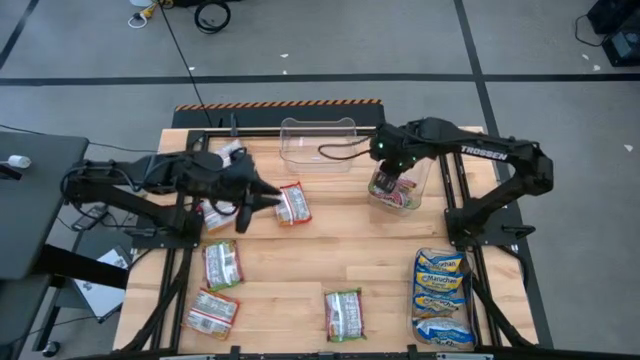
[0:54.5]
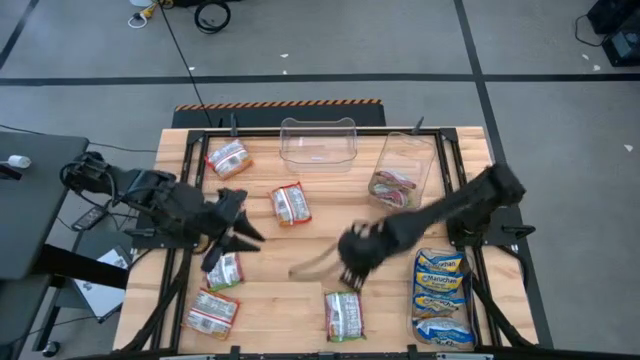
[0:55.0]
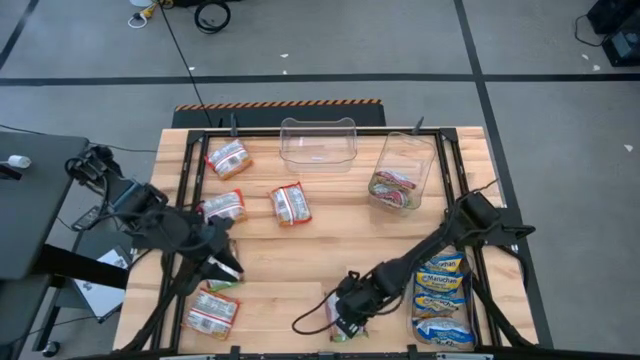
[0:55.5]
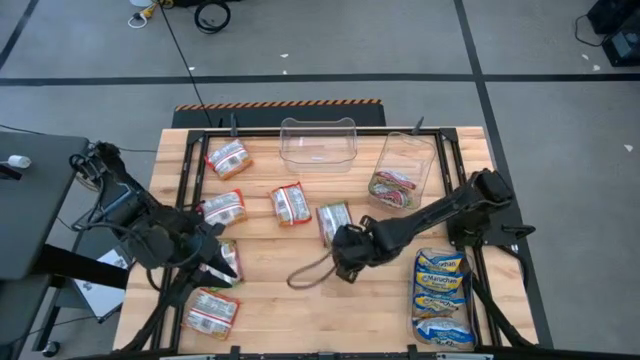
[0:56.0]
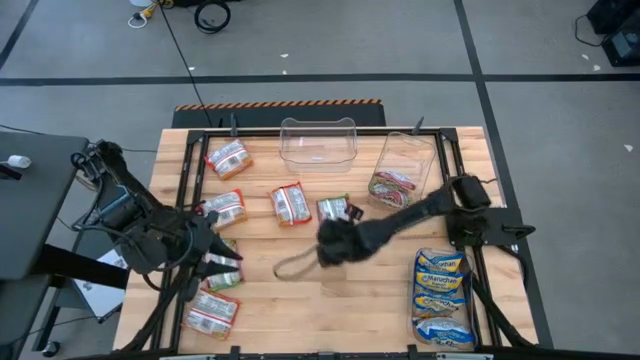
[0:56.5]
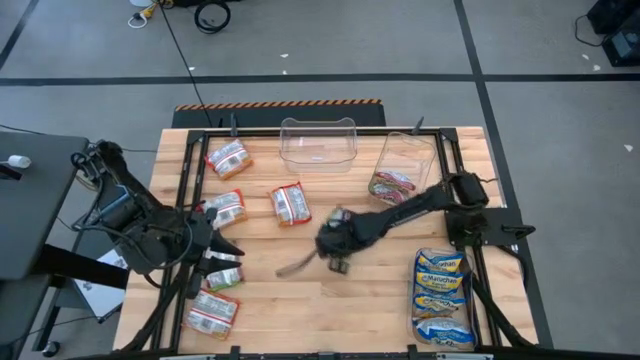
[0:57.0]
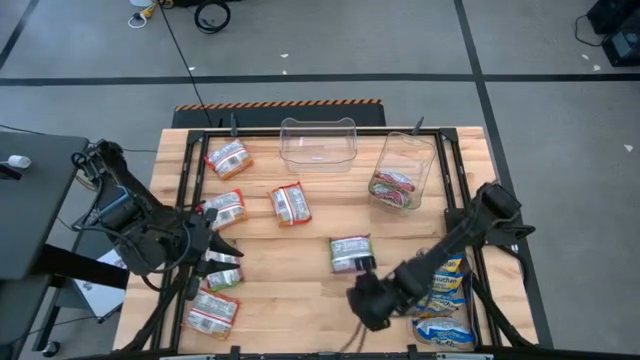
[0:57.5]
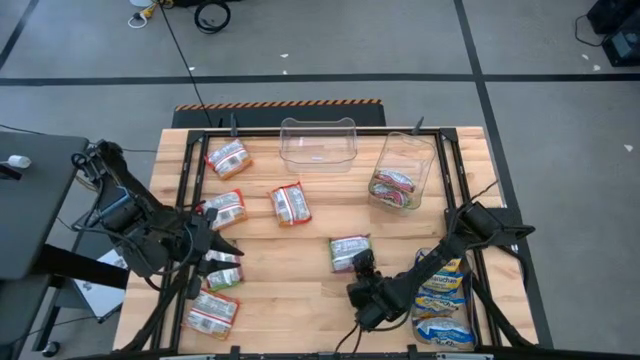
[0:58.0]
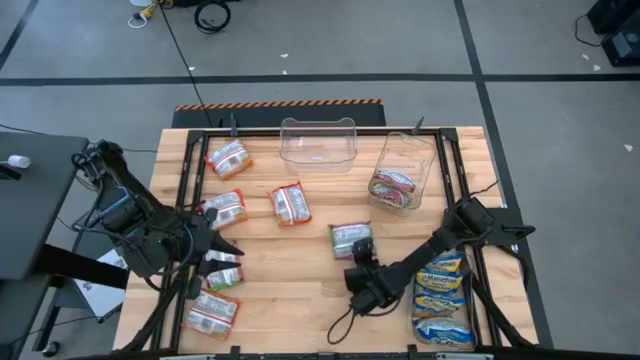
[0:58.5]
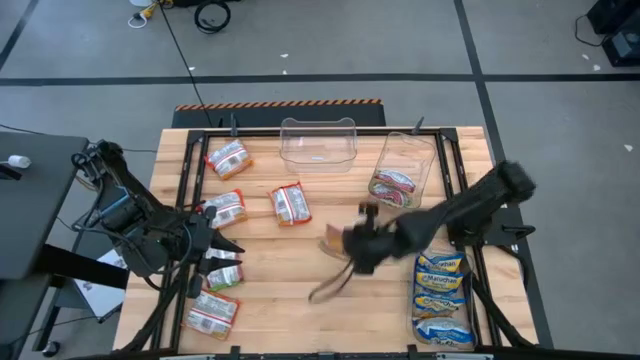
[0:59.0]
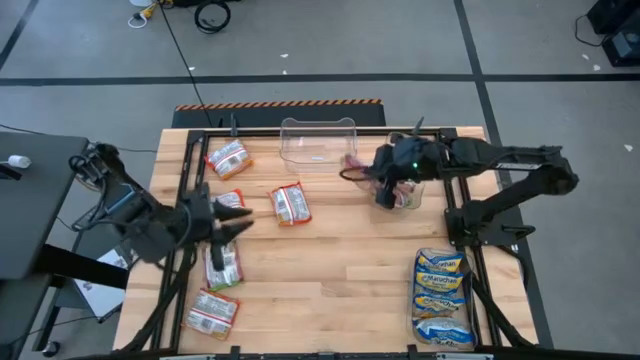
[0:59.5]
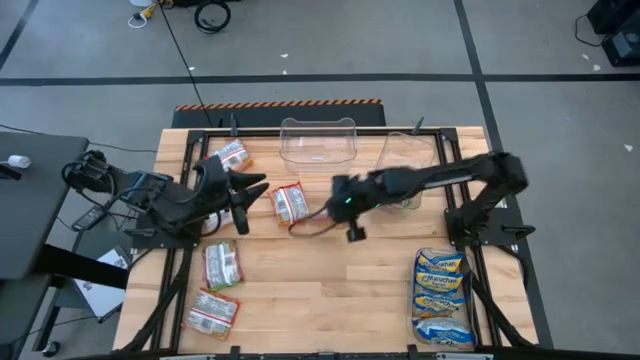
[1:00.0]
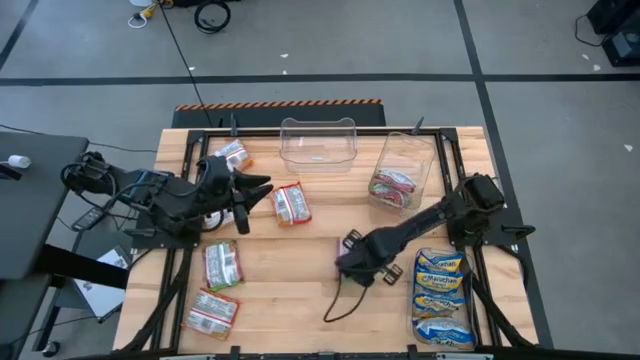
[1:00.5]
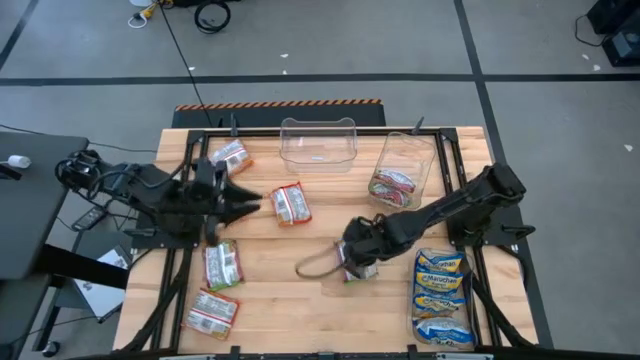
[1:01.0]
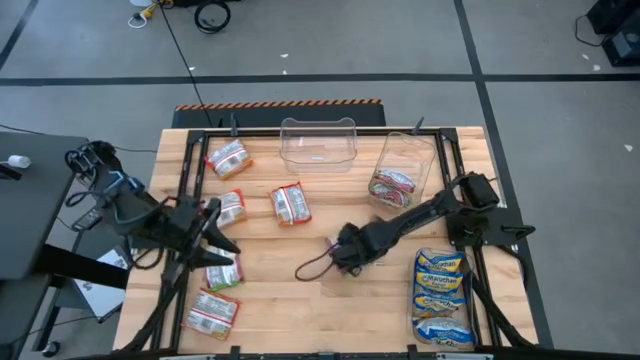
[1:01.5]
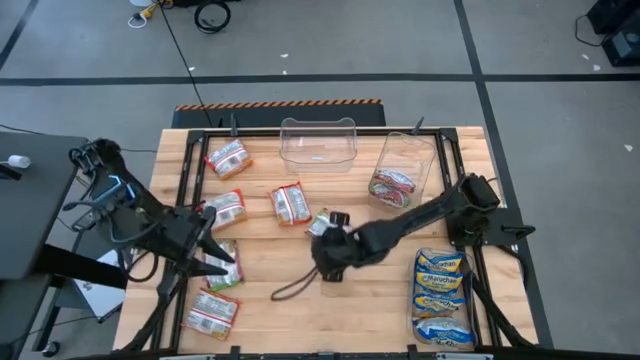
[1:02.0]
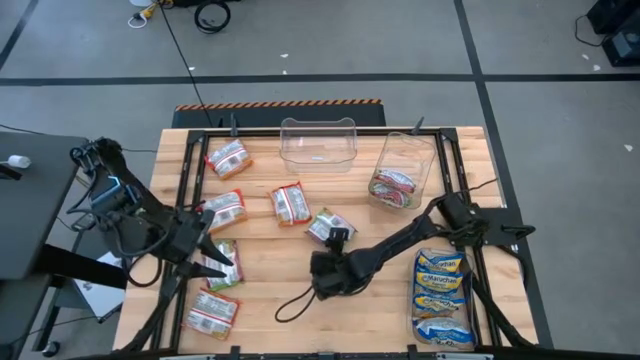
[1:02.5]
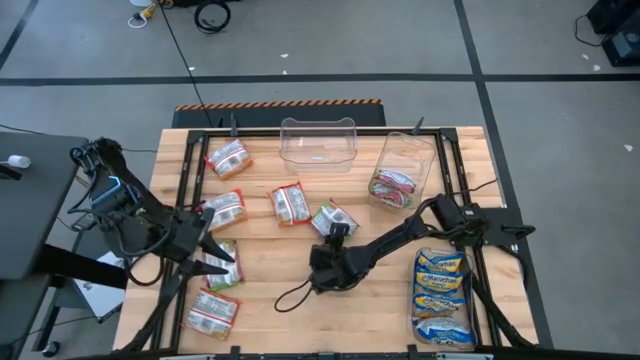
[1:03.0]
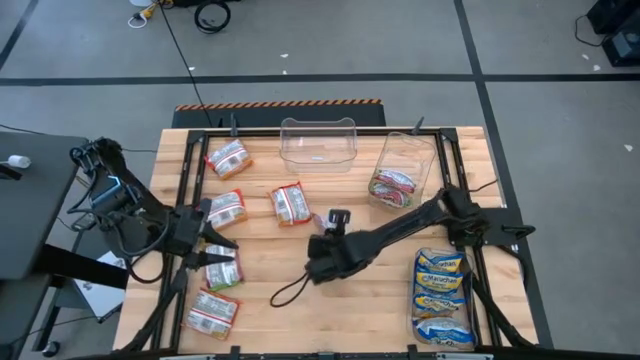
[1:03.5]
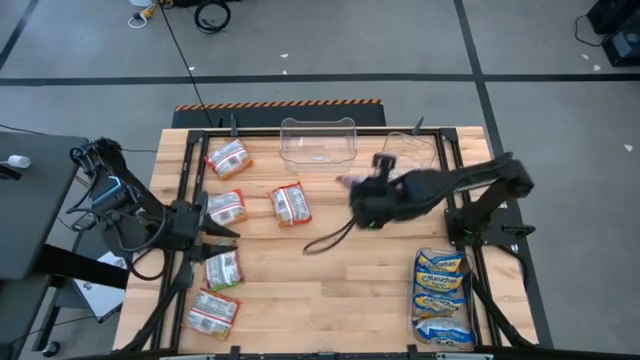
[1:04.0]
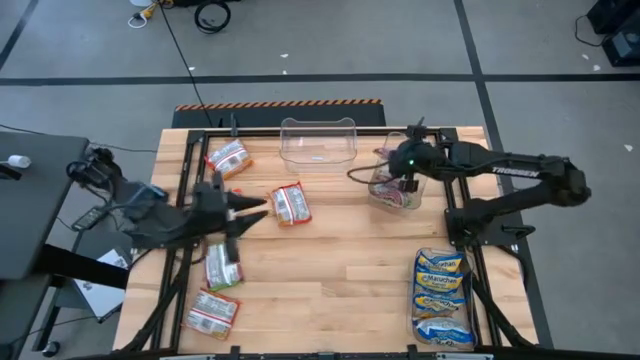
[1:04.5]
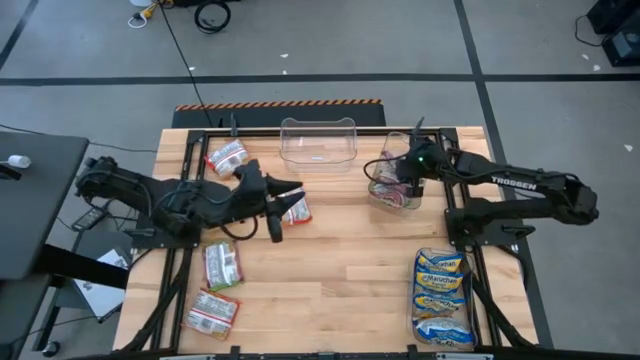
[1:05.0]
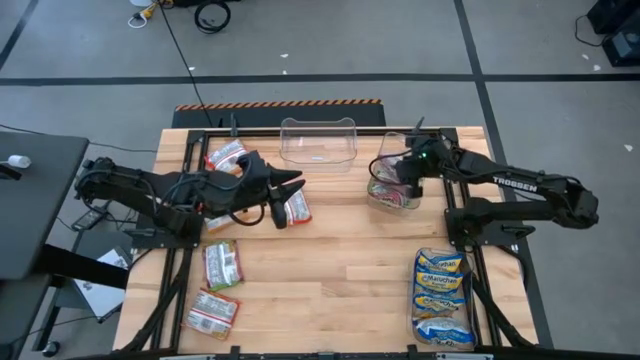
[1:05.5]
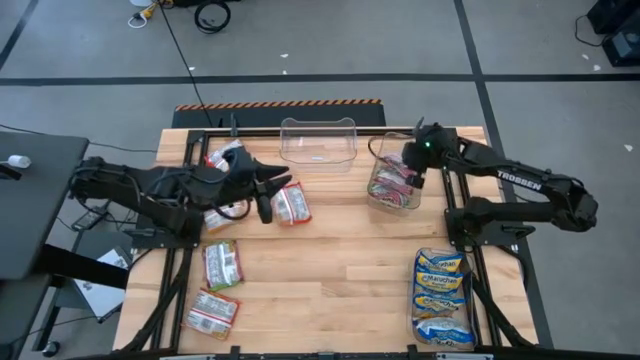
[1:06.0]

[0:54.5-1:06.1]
Task: Sort Maruchan noodles
Put the bottom red noodle pack into the top right transparent bin

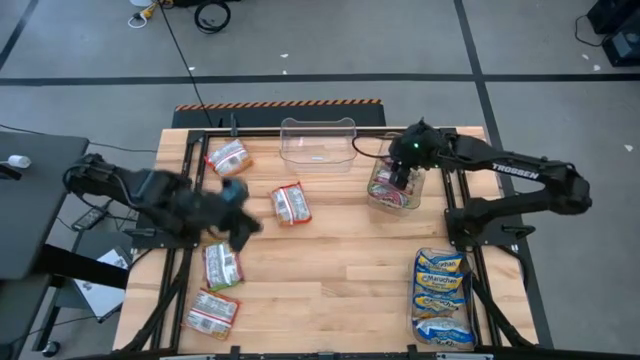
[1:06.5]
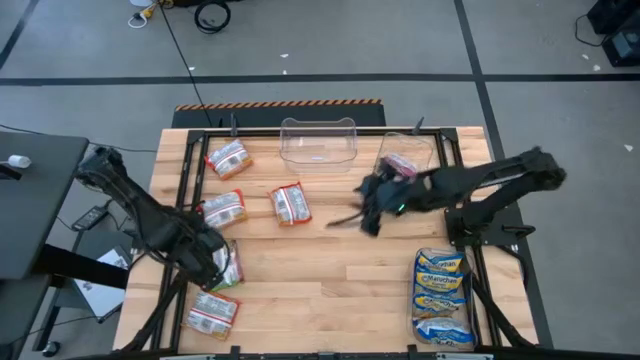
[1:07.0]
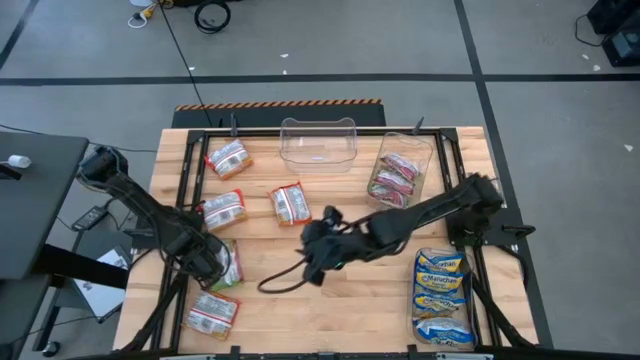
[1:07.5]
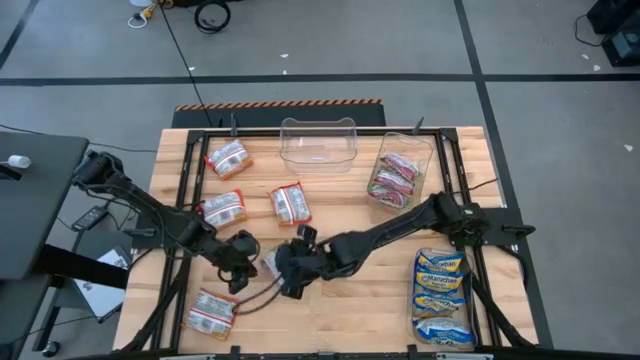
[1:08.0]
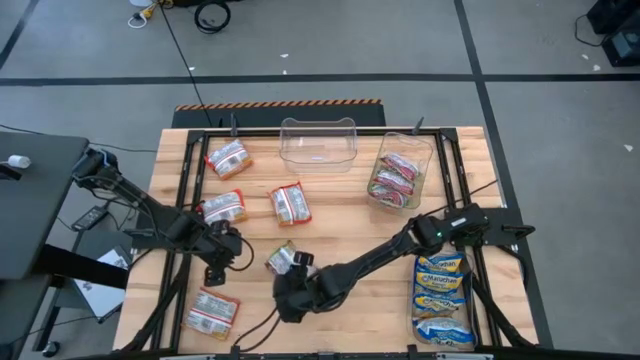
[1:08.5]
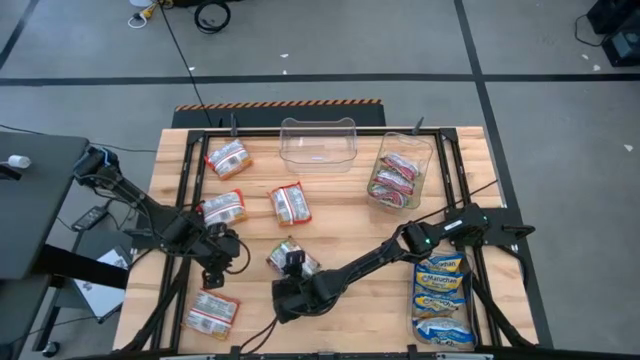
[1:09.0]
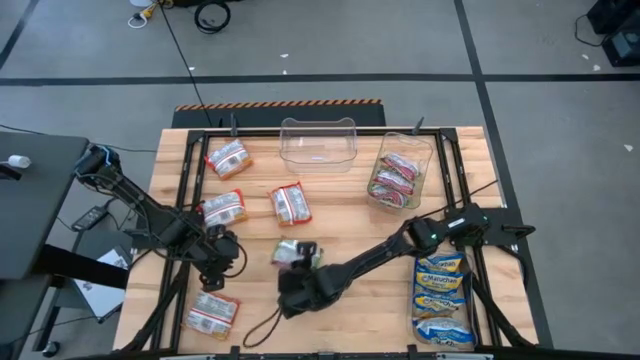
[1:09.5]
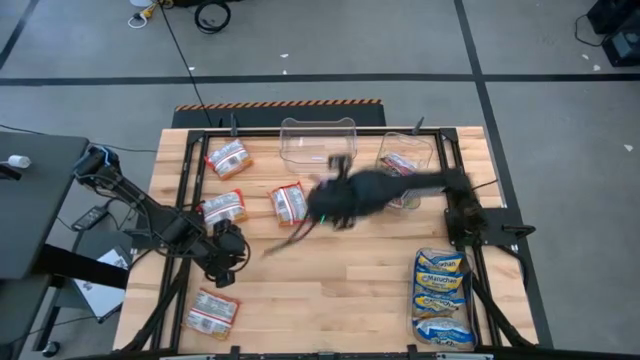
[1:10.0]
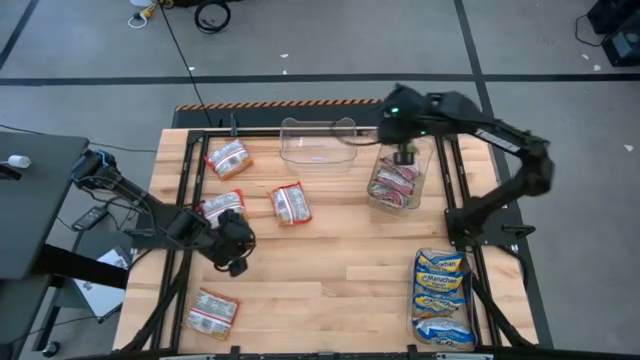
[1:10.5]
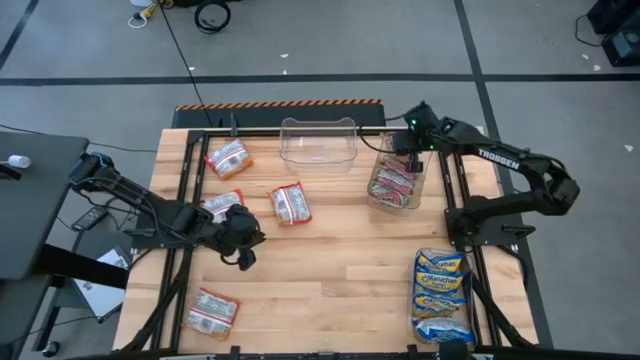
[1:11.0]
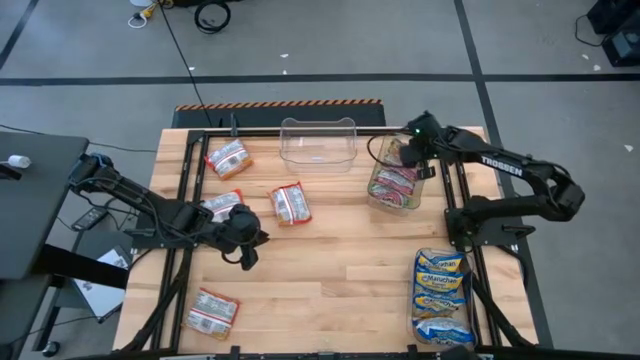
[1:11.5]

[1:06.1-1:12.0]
Put the red noodle pack into the top right transparent bin

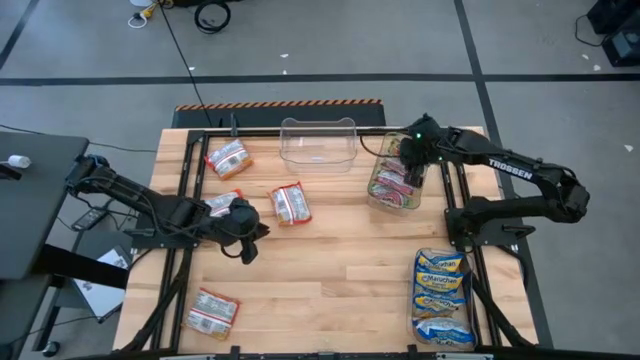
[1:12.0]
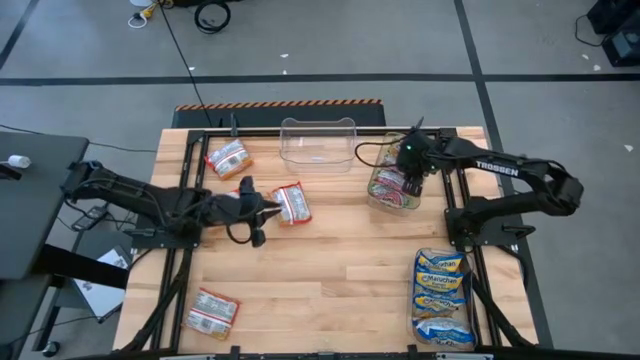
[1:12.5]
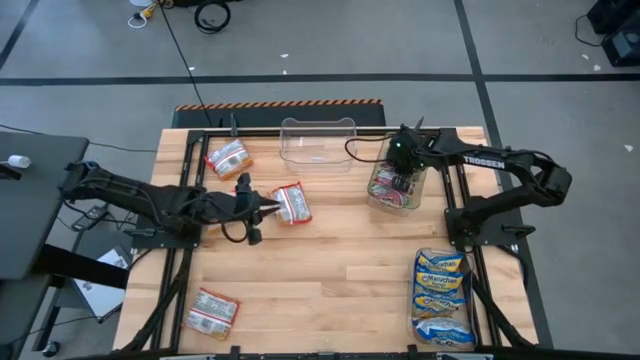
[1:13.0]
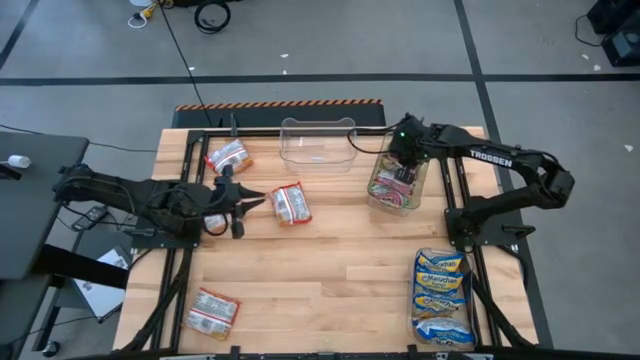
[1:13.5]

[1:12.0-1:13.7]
Adjust the red noodle pack

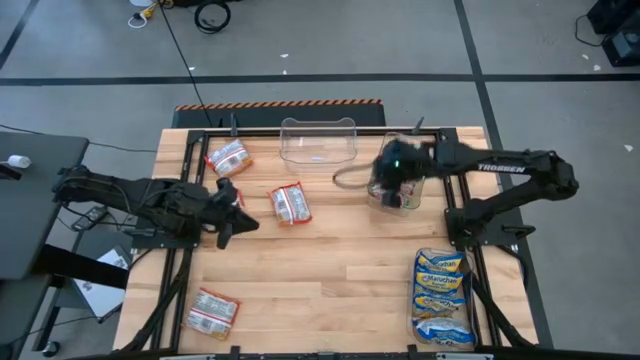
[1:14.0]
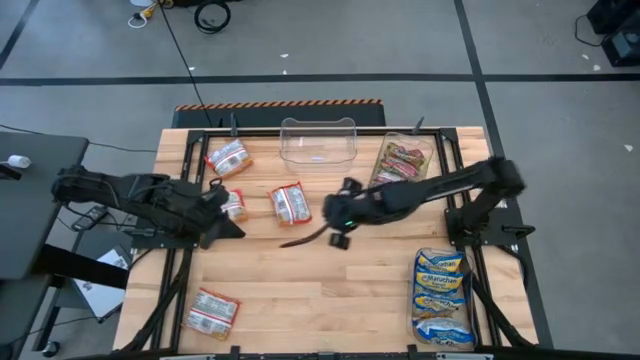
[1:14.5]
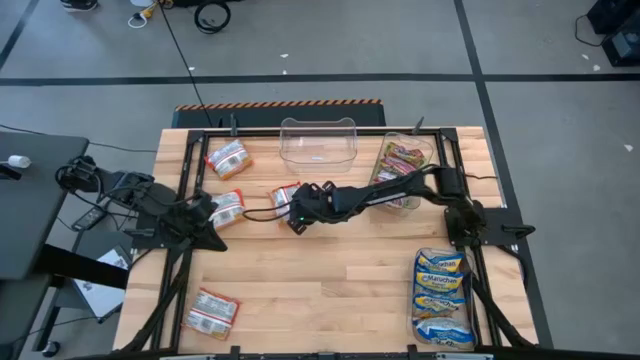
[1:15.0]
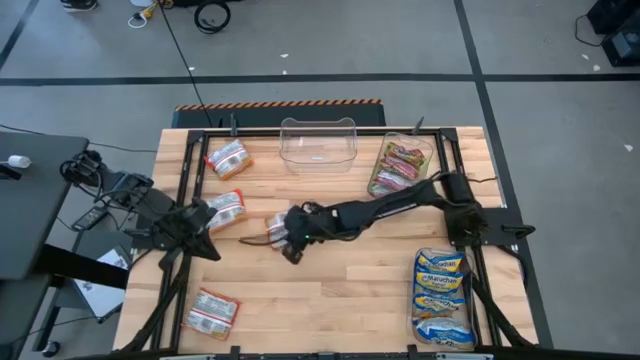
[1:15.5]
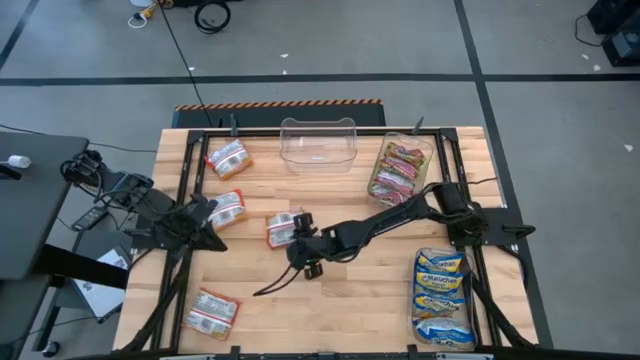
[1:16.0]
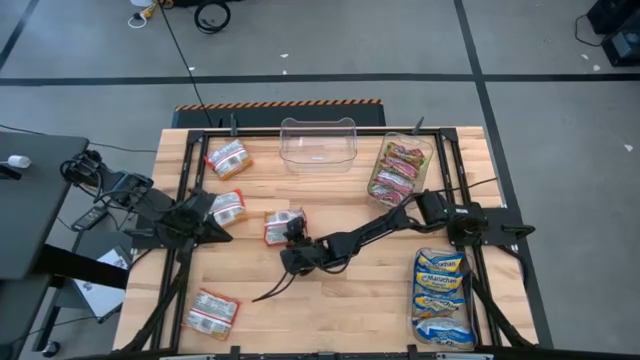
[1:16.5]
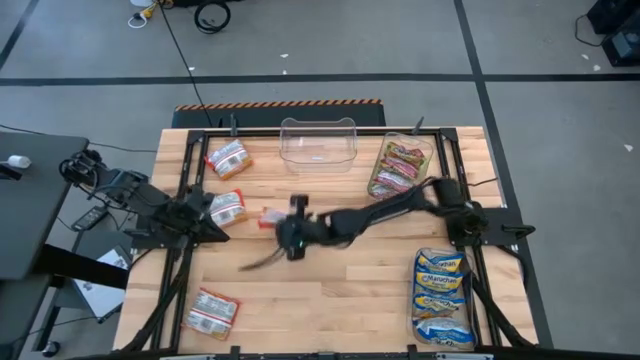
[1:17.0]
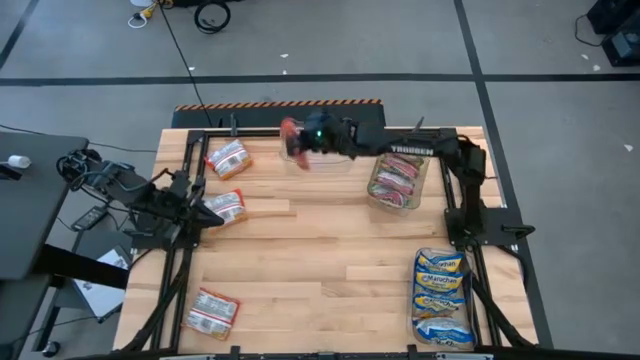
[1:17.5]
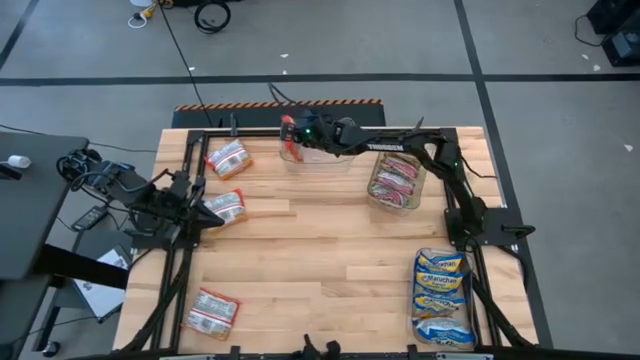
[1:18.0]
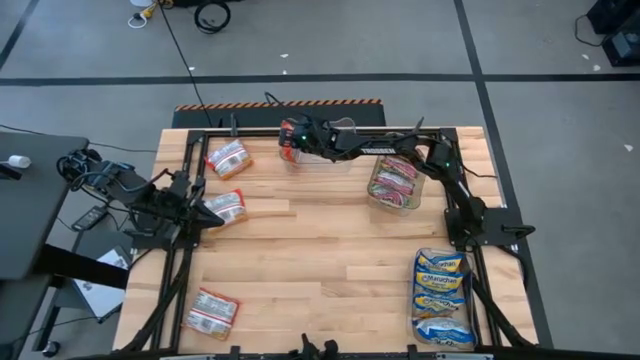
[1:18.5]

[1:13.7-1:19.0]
Put the right orange noodle pack into the top left transparent bin
